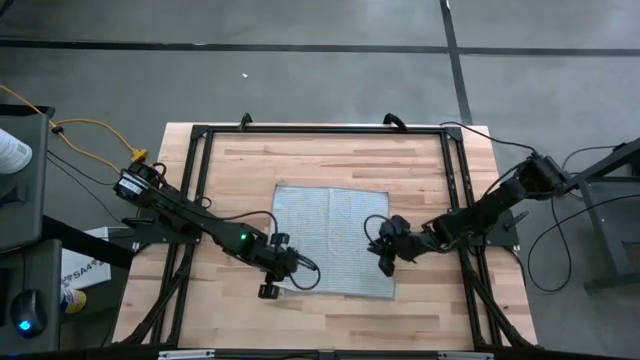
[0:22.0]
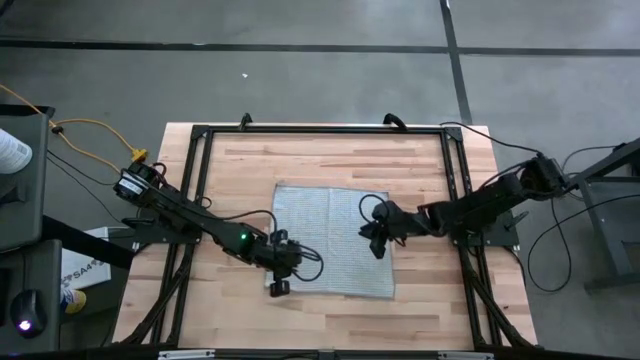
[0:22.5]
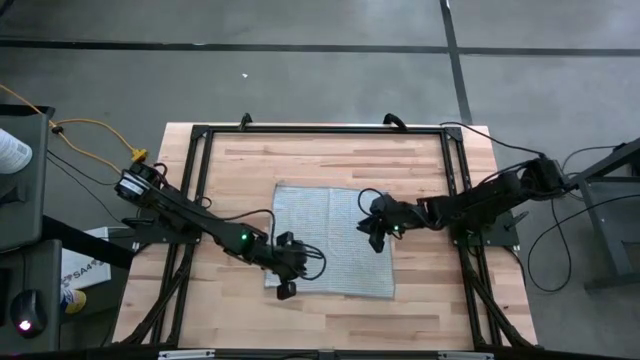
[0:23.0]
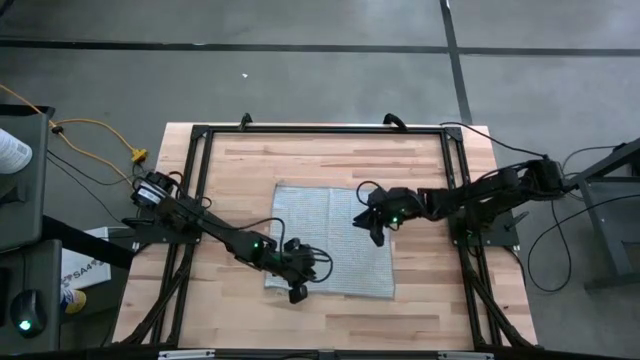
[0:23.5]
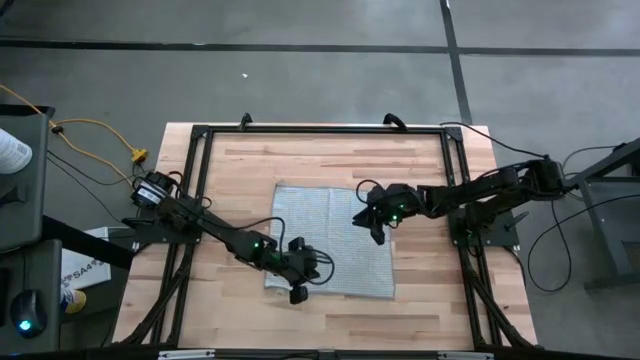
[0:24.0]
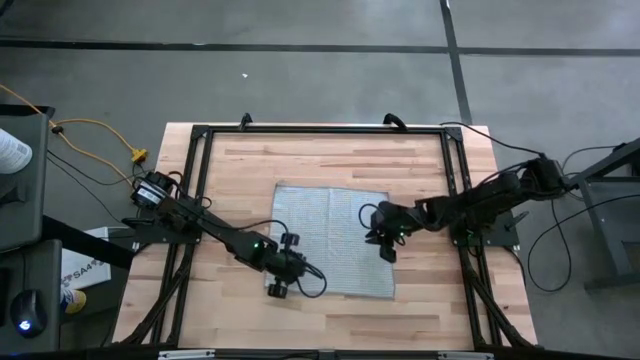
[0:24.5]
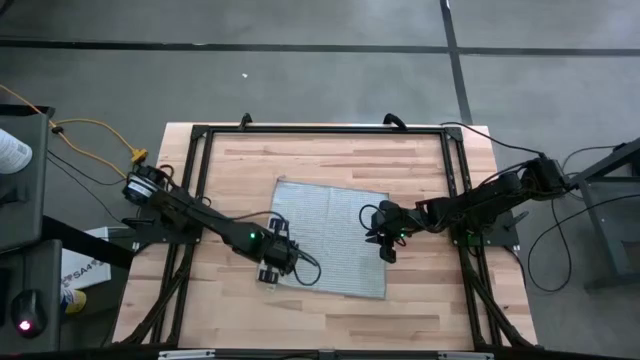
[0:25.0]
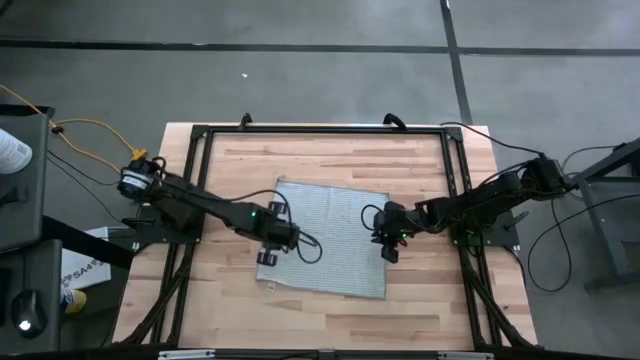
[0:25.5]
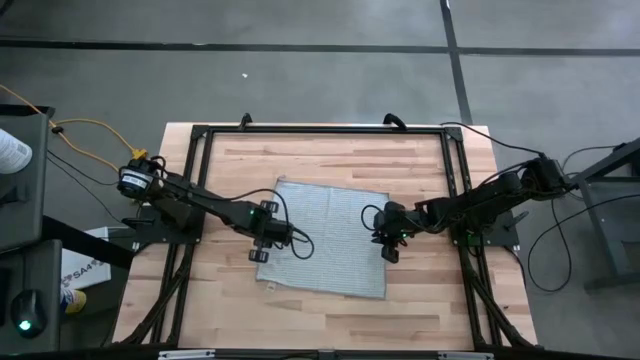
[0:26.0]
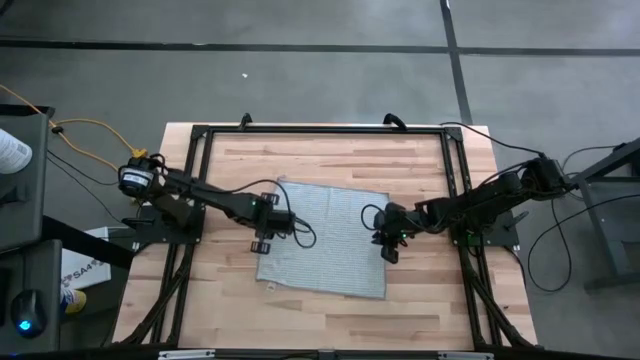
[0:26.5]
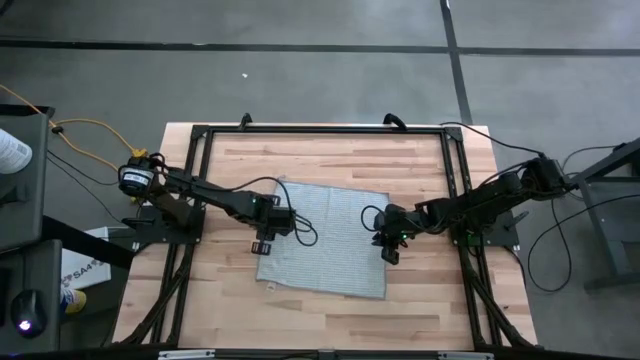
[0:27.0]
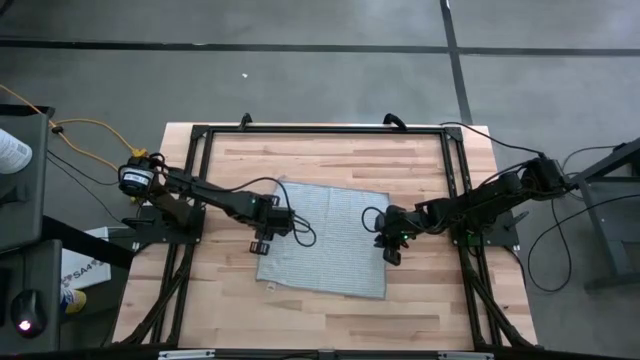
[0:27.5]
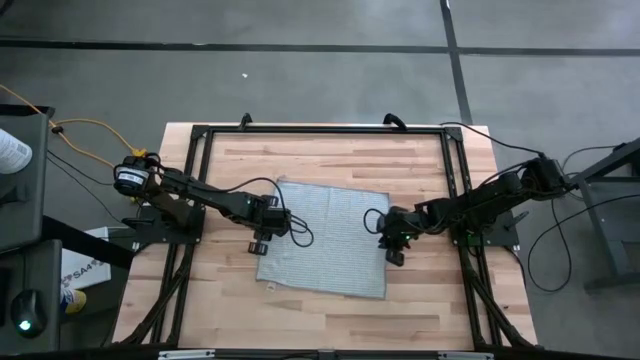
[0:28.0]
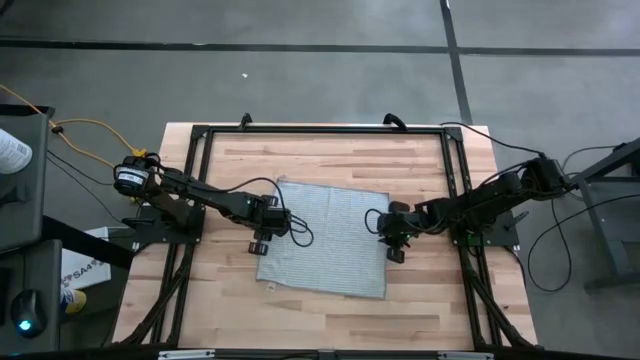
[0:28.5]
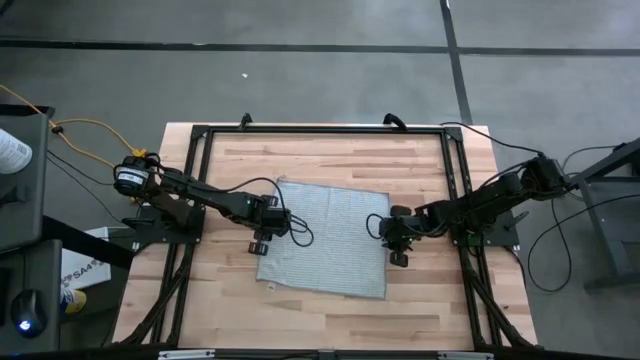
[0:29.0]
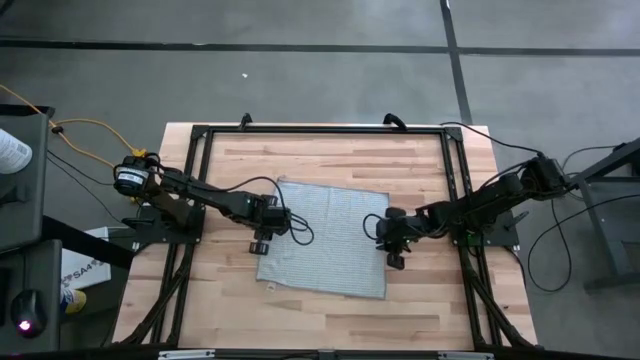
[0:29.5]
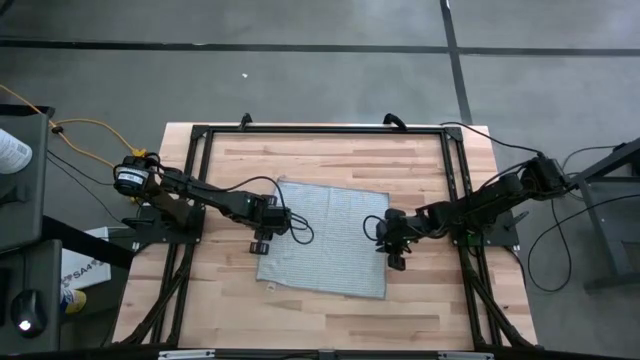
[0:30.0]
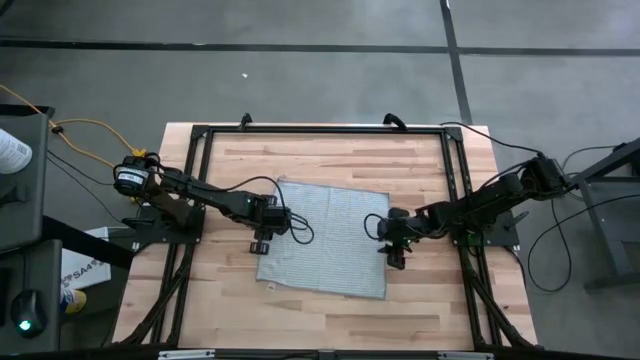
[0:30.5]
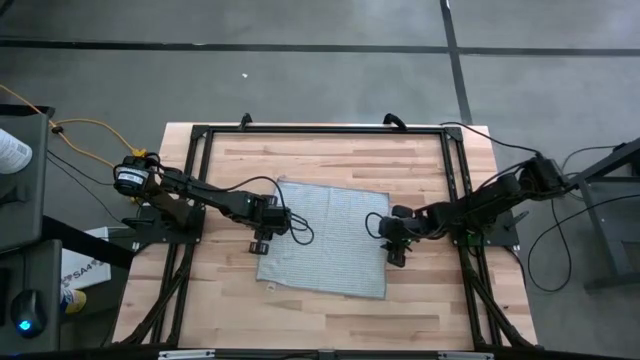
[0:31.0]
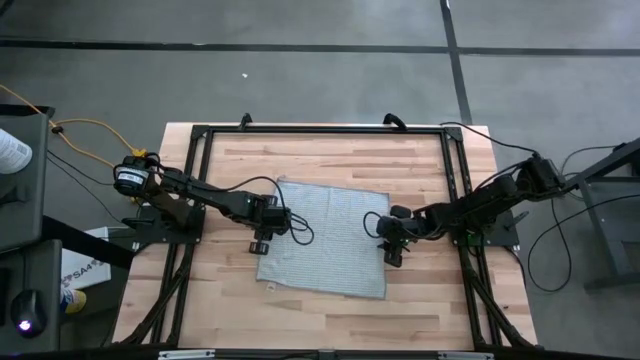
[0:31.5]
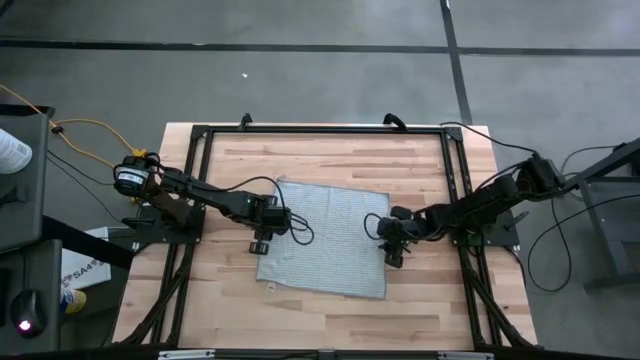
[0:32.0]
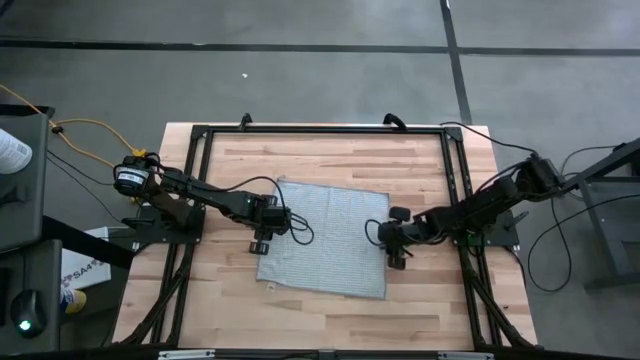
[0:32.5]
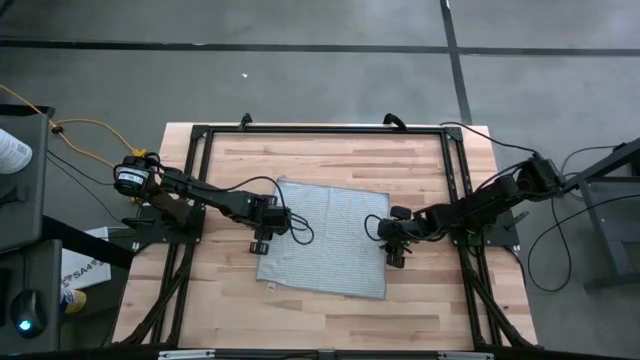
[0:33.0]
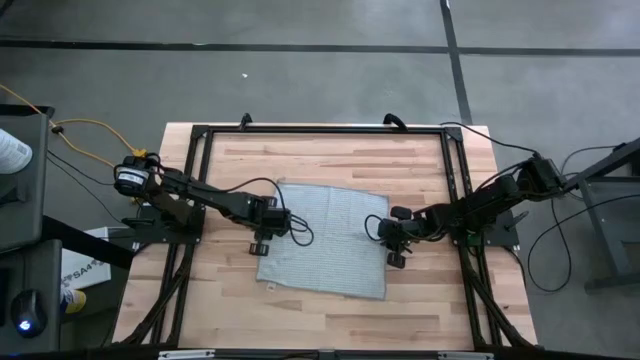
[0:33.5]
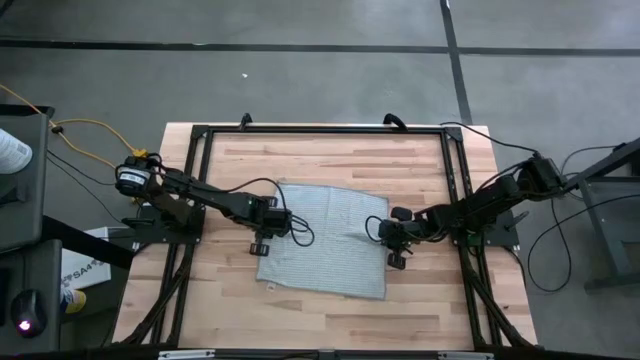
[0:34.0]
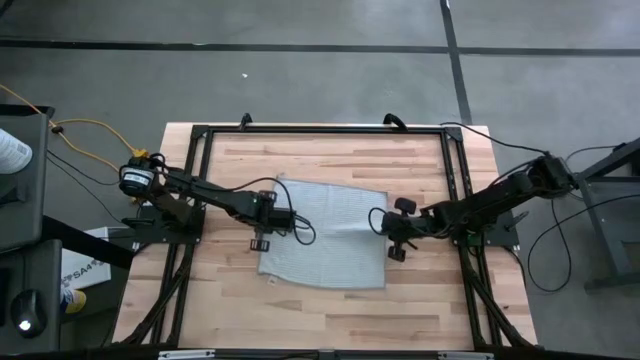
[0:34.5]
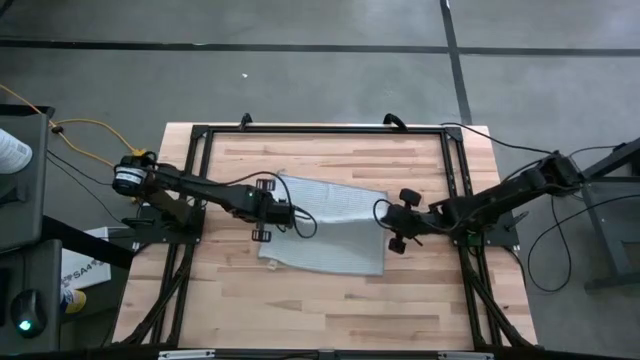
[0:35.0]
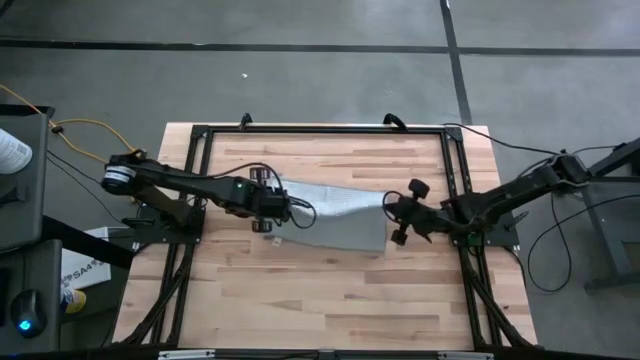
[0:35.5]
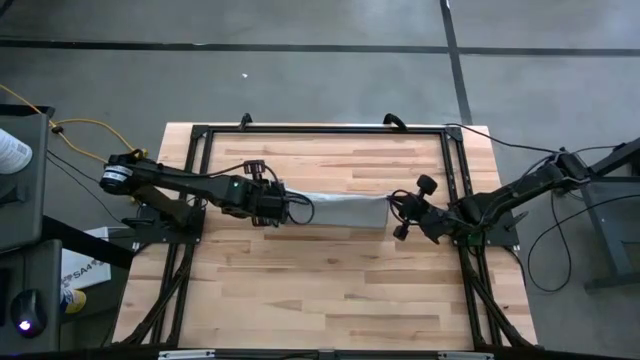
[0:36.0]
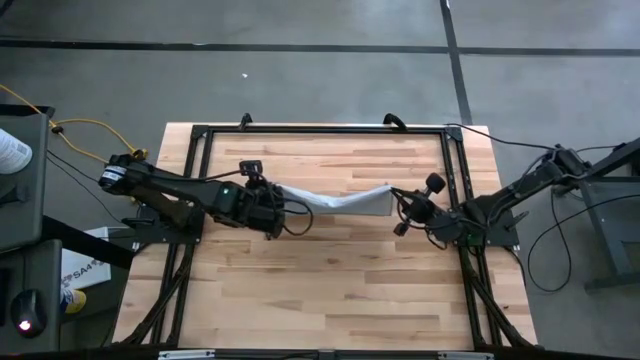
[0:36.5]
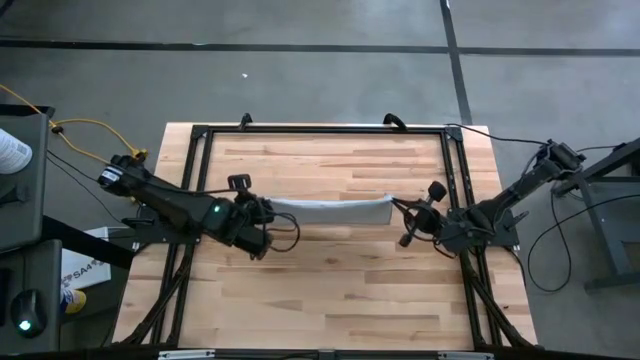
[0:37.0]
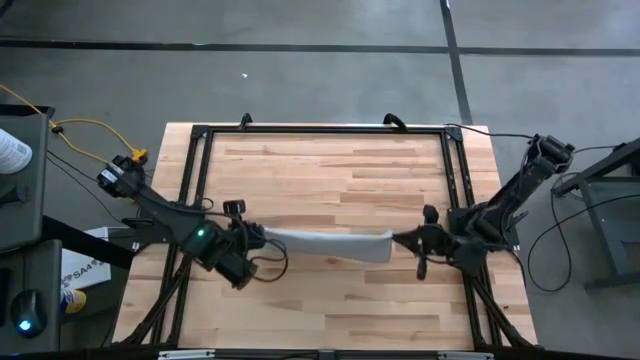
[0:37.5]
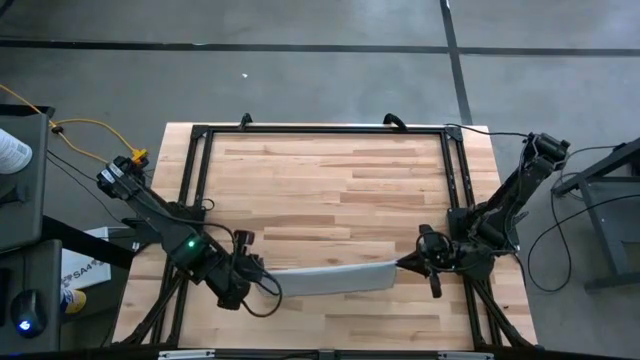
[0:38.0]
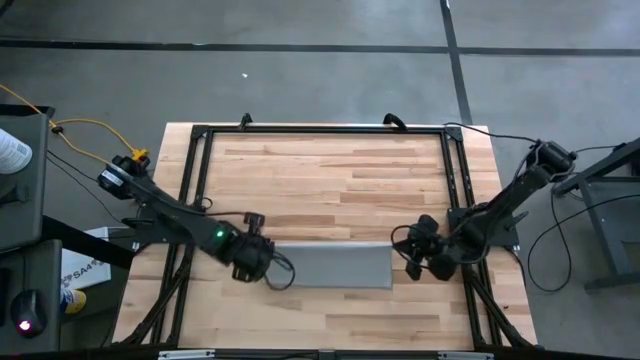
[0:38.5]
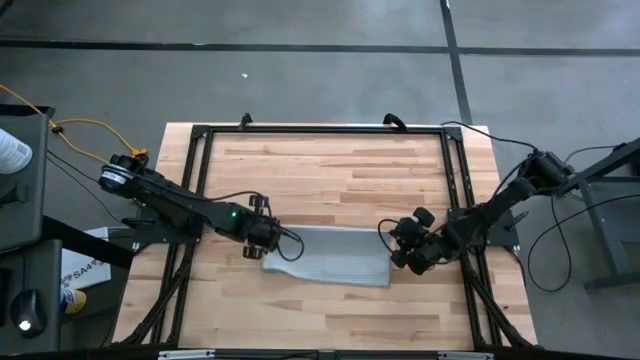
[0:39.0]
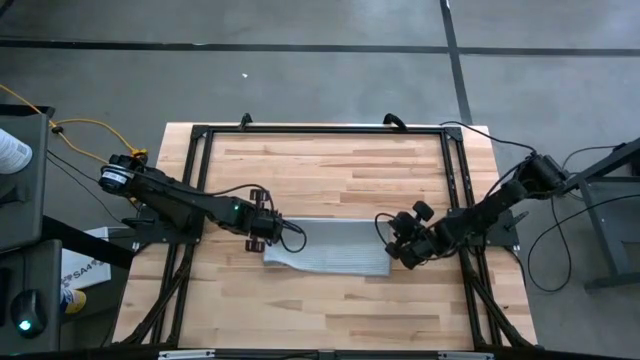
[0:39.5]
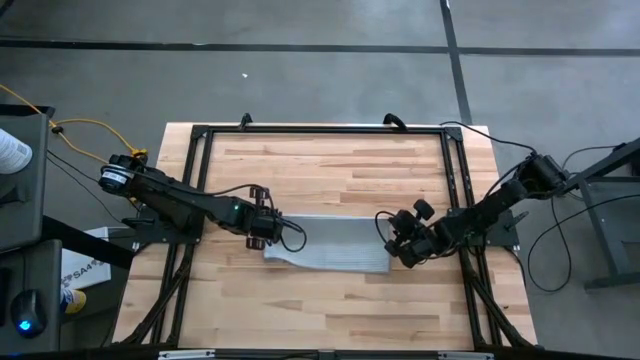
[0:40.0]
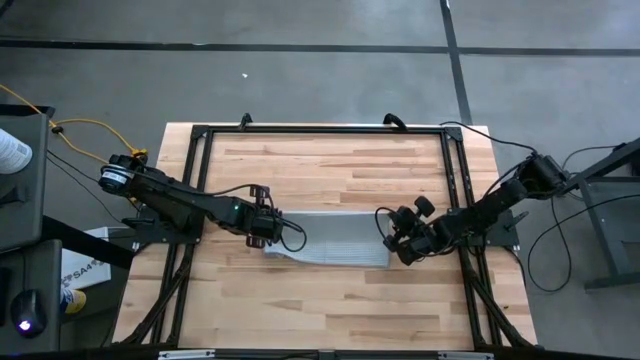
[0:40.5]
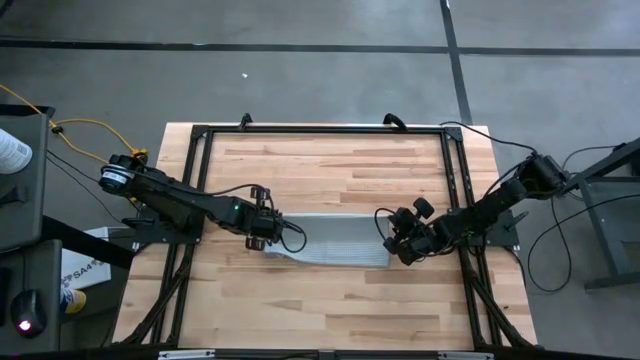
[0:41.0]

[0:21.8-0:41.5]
Task: Fold microfiber towels
Fold the grey towel

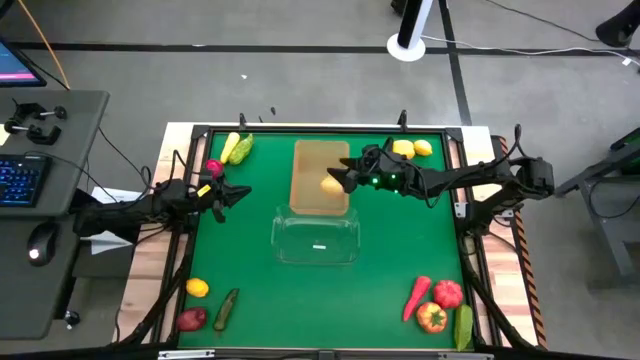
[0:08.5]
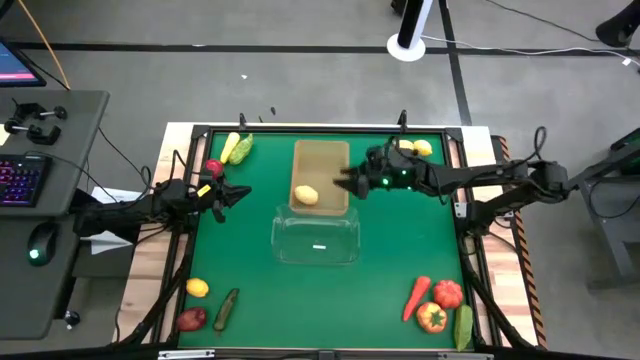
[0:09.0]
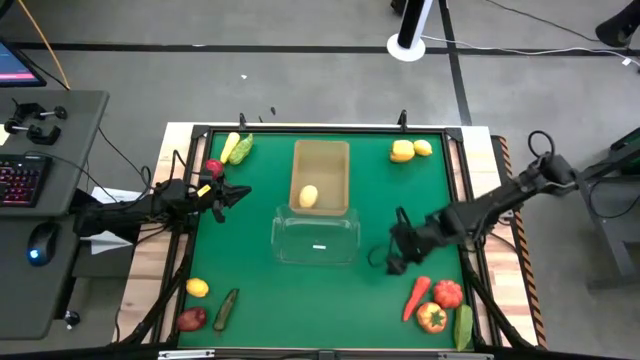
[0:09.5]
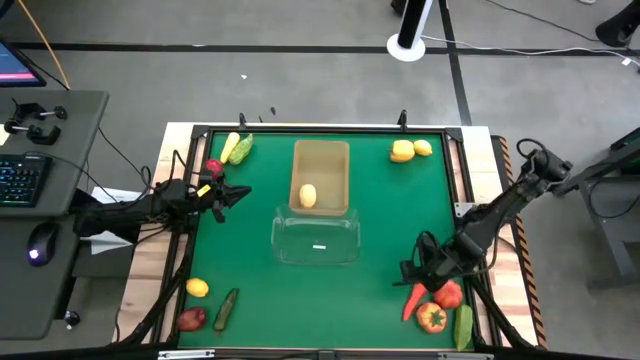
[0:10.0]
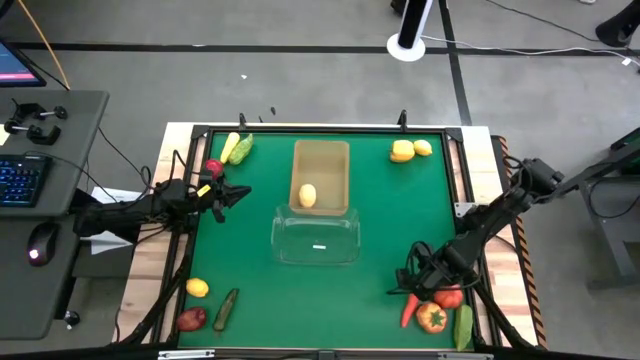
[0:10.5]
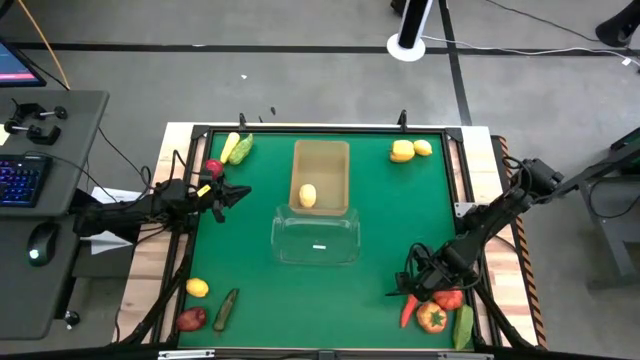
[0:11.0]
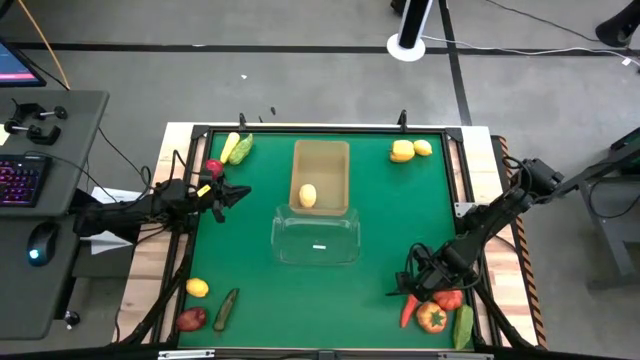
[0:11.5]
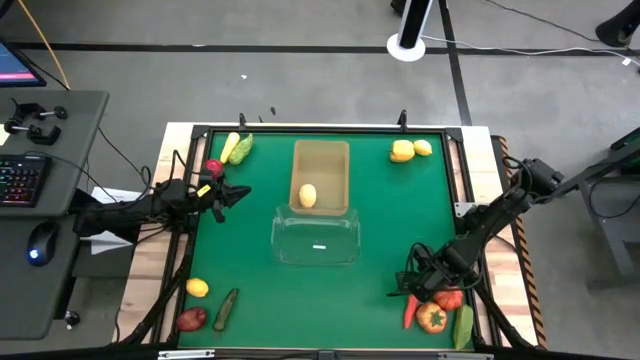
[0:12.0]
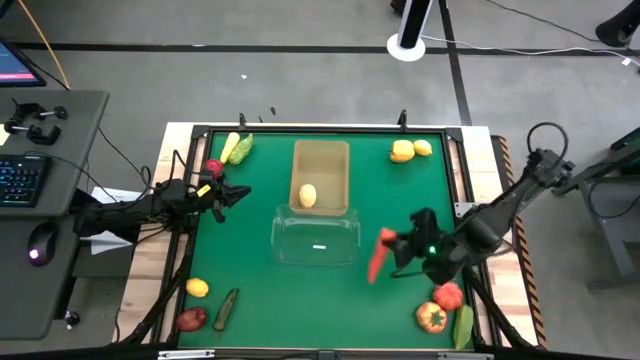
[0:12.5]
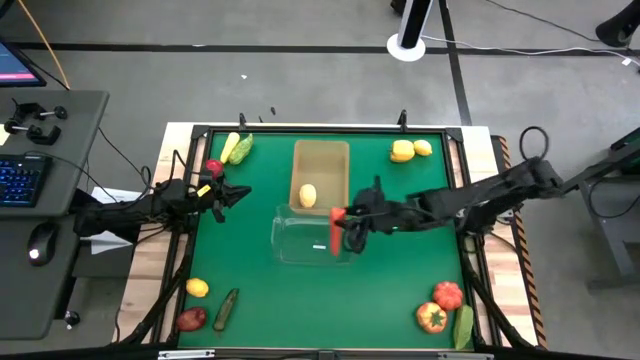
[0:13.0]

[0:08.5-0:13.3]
Task: Sort produce into baskets
Put the orange carrot into the transparent bin
